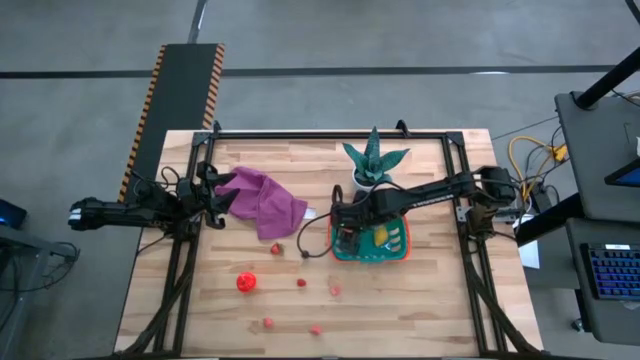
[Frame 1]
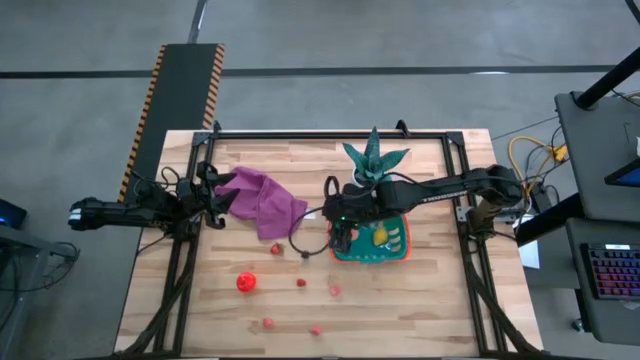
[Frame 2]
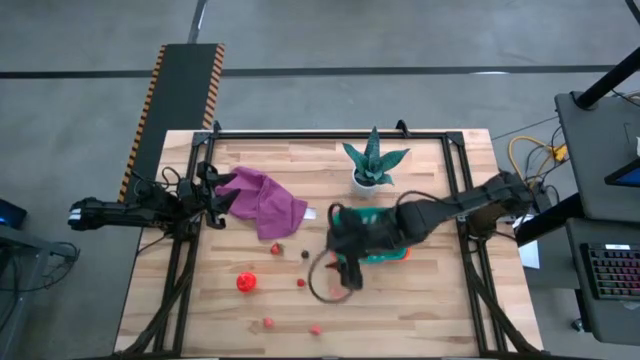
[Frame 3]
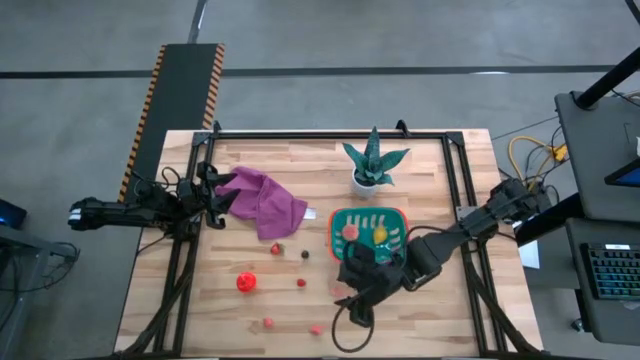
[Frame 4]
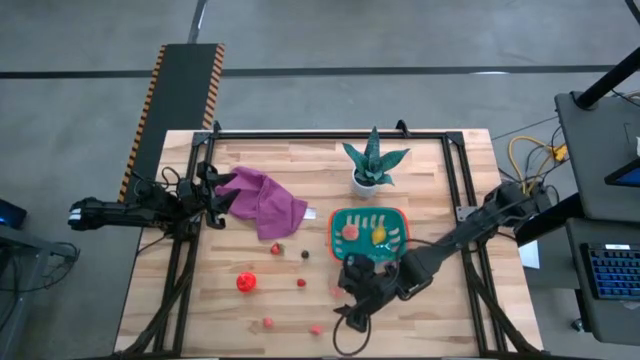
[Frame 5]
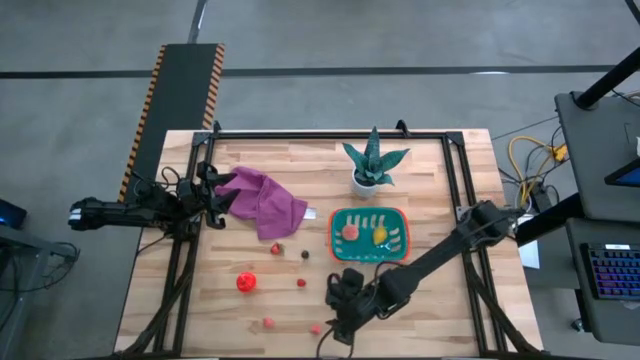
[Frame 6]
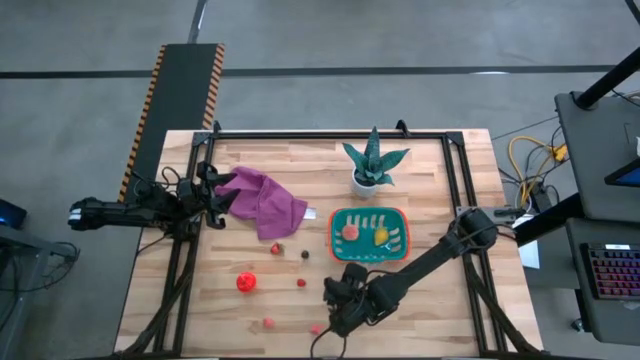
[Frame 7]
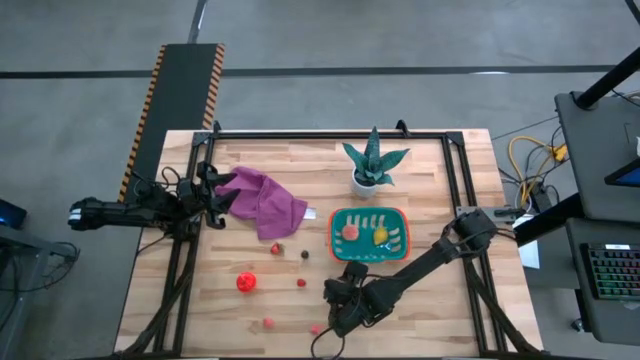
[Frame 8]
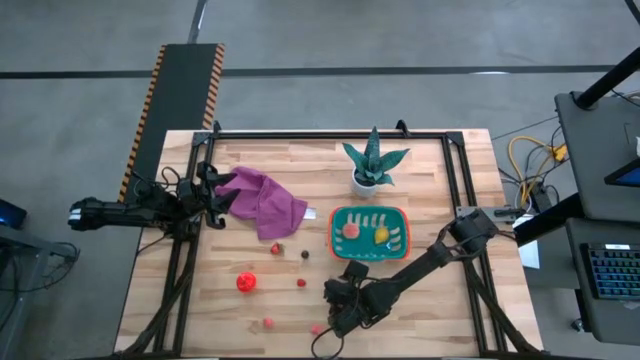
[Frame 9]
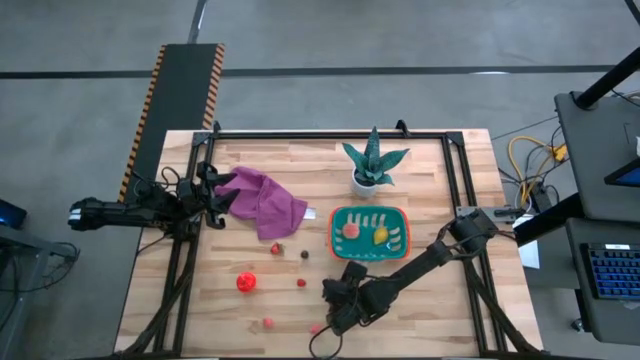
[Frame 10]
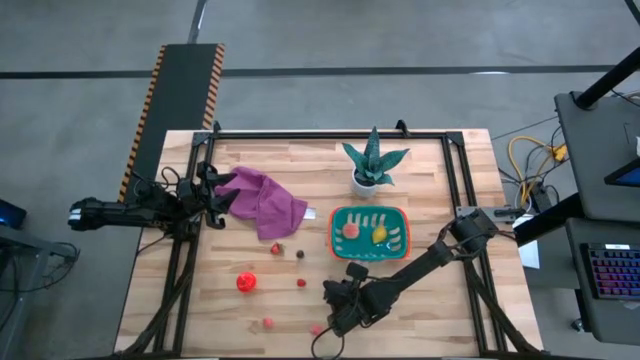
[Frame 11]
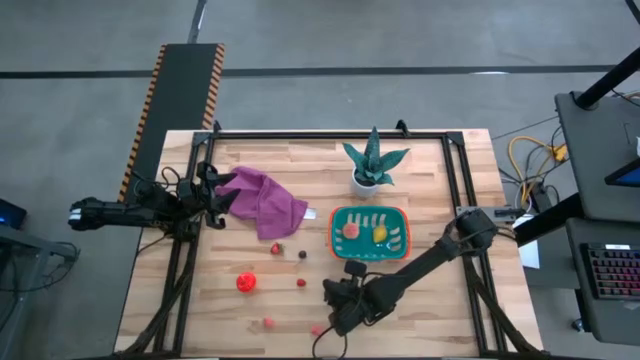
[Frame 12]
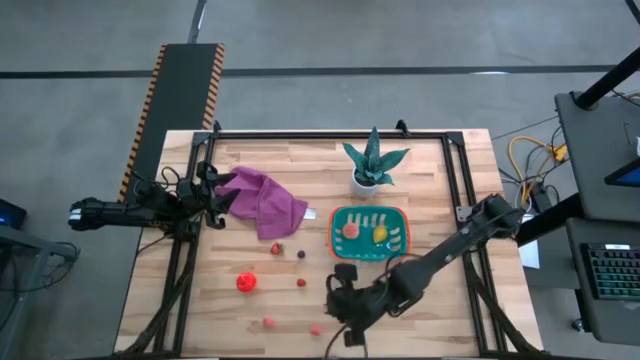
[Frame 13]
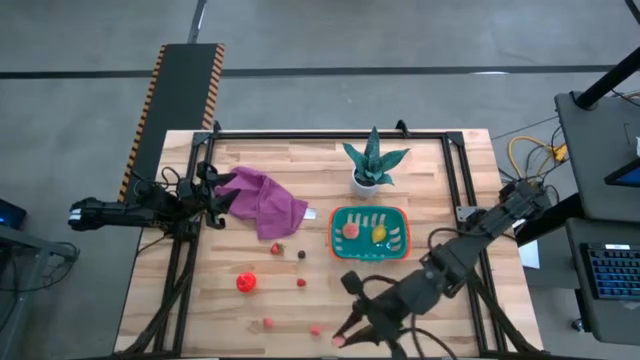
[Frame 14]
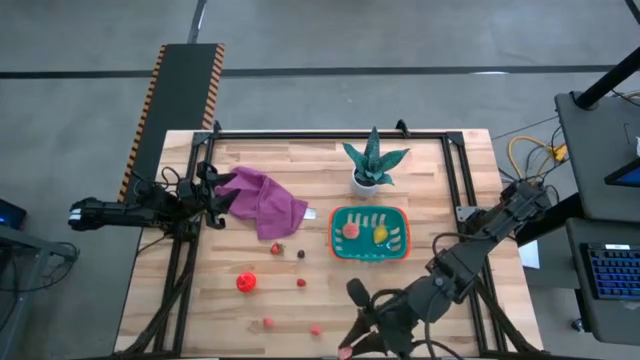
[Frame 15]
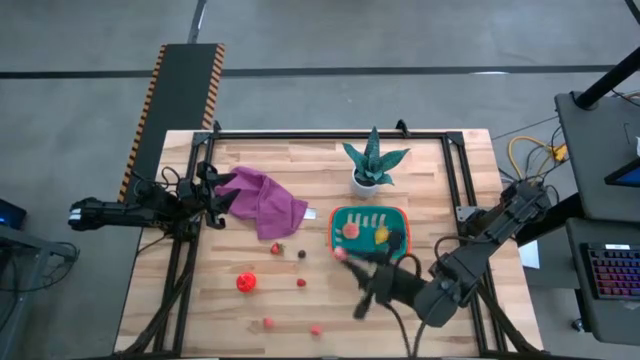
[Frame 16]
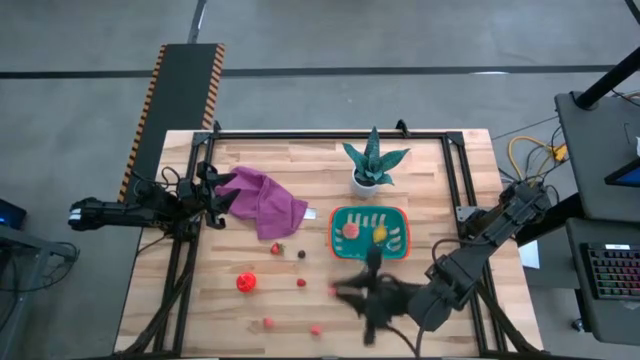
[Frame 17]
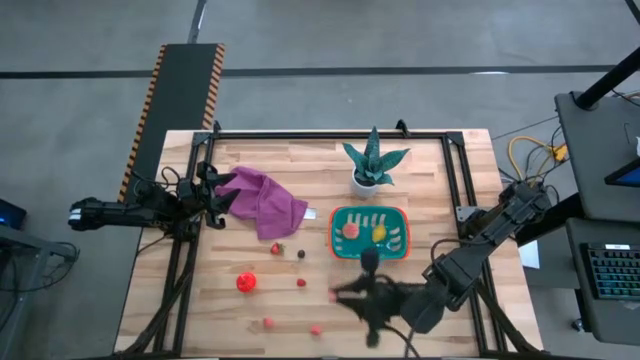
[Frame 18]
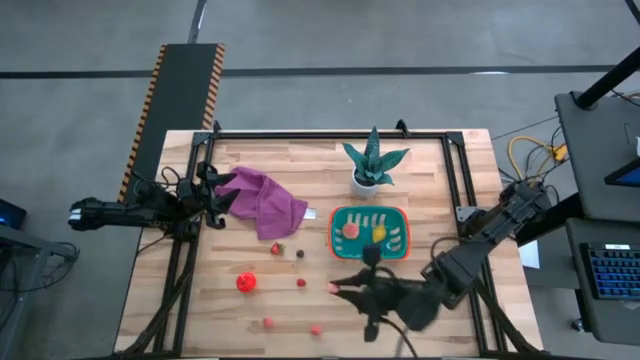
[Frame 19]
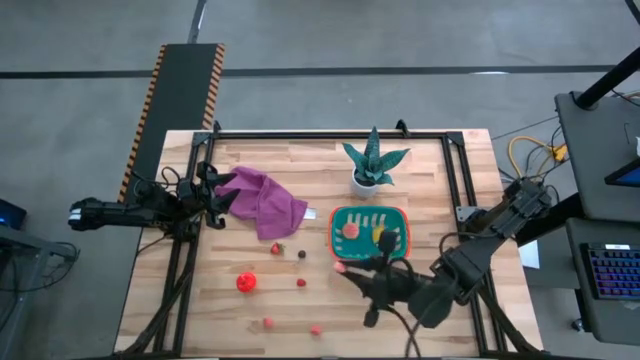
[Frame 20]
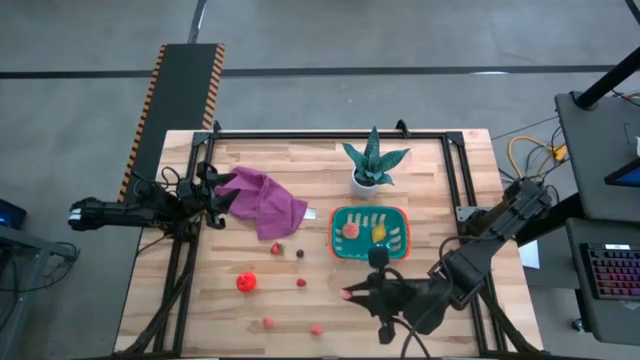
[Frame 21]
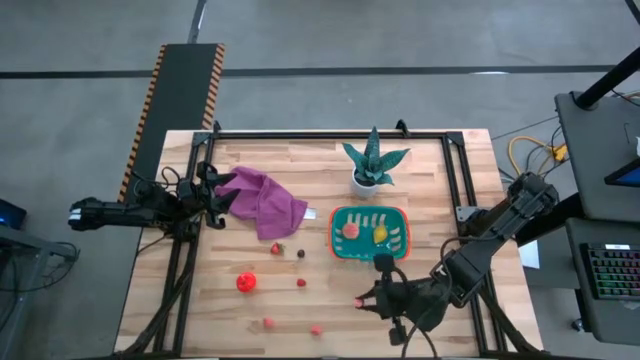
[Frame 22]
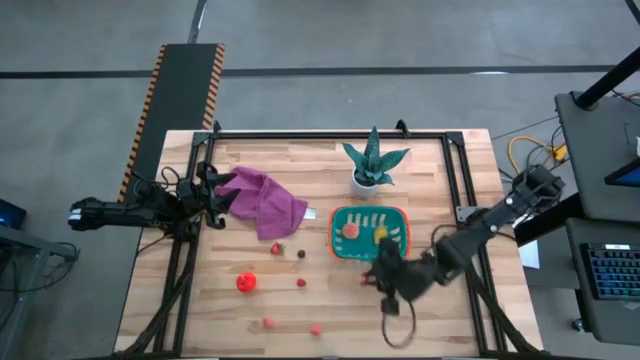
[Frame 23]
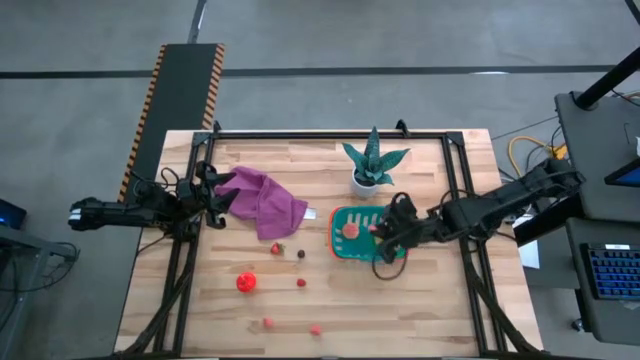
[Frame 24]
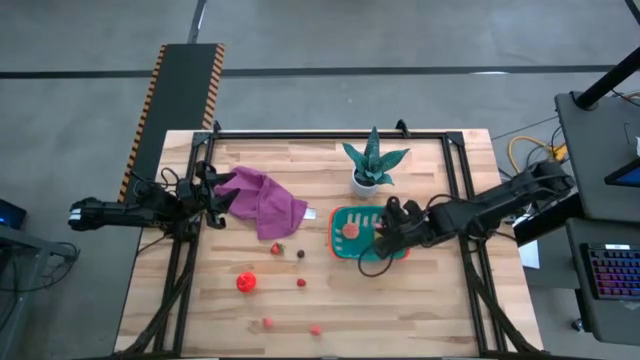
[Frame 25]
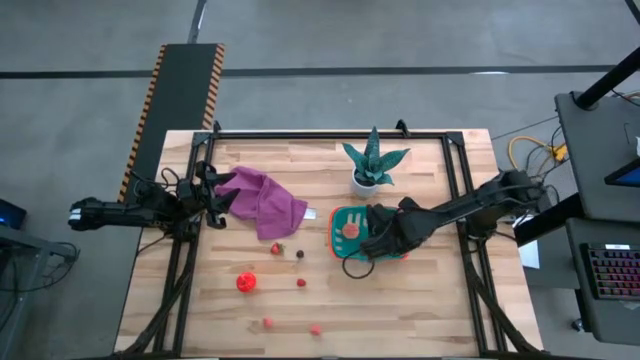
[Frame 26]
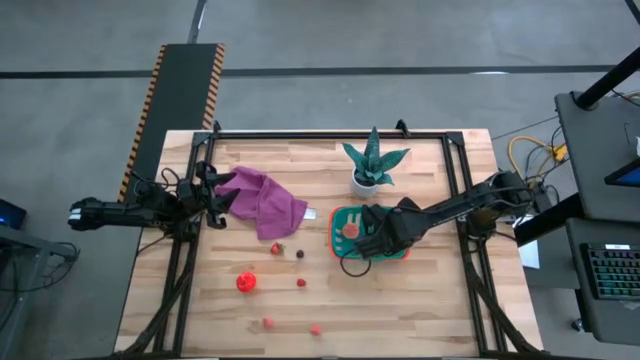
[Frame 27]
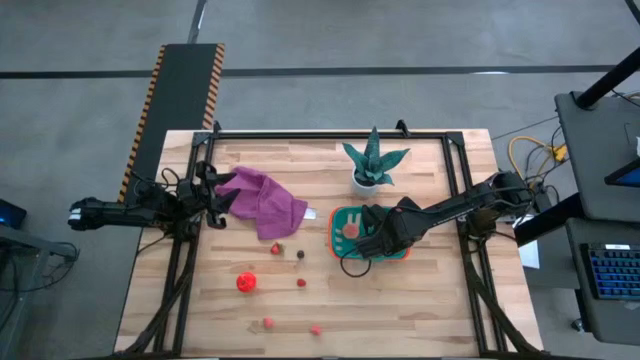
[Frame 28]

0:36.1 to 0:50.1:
Task: Pick and placing Produce into tupperware
Put the top apricot into the green basket

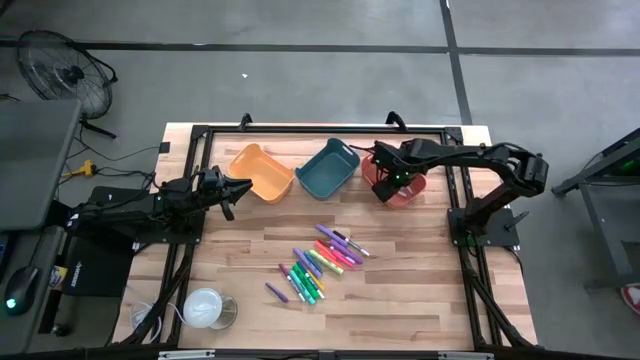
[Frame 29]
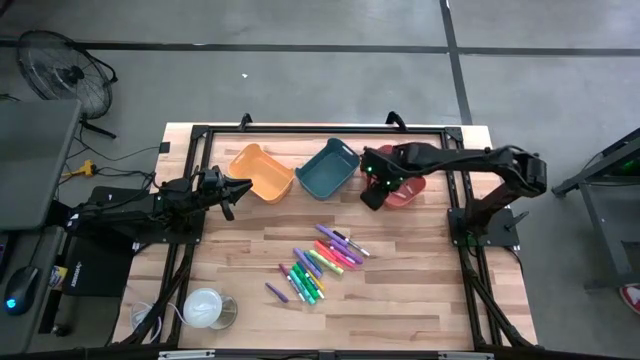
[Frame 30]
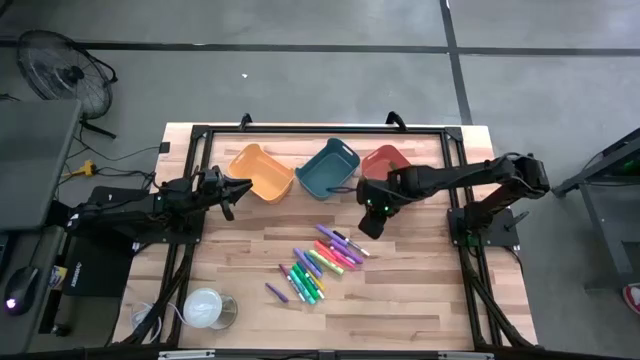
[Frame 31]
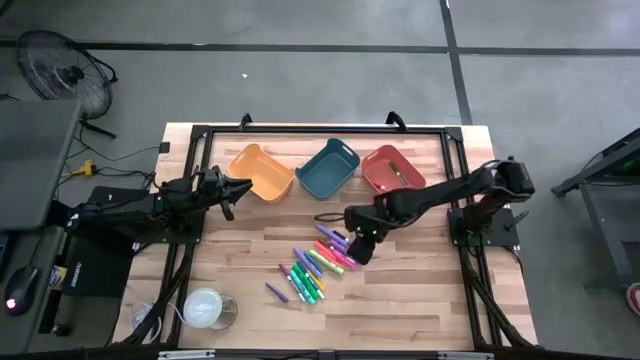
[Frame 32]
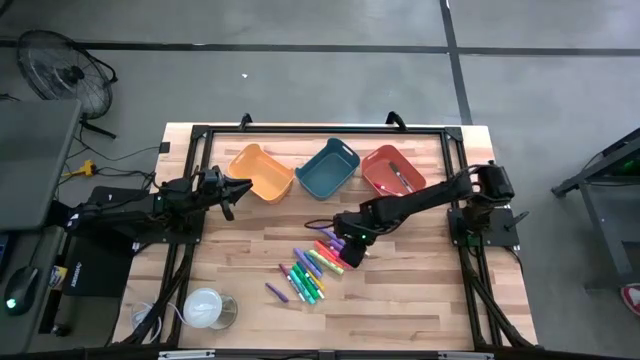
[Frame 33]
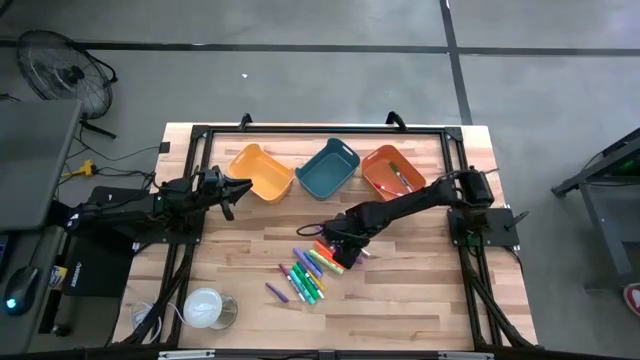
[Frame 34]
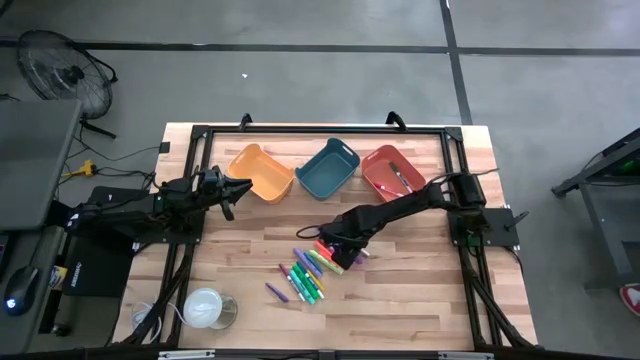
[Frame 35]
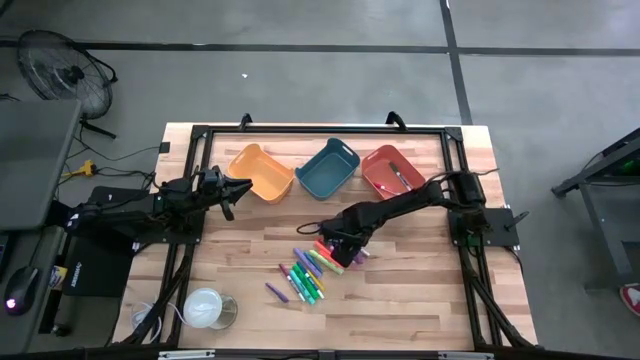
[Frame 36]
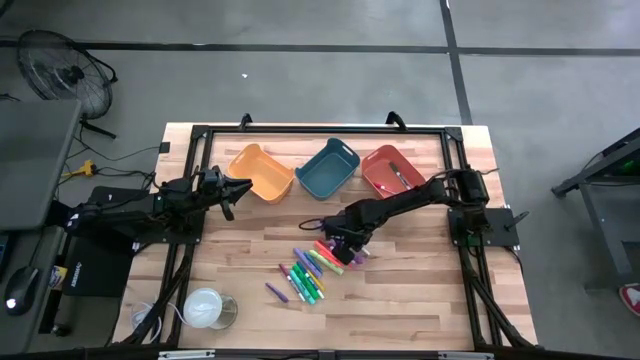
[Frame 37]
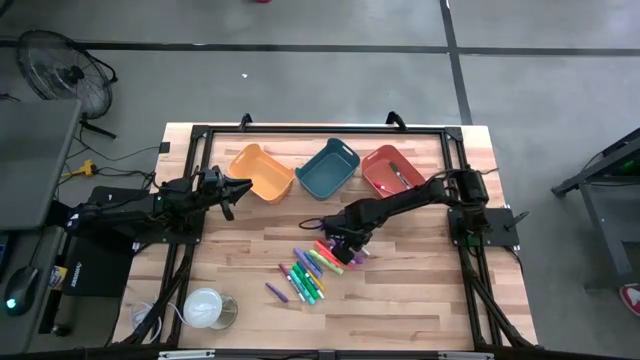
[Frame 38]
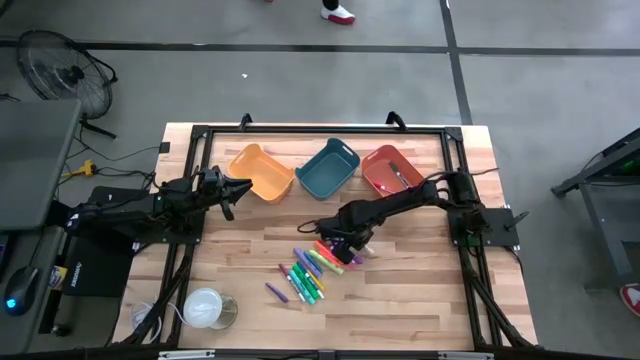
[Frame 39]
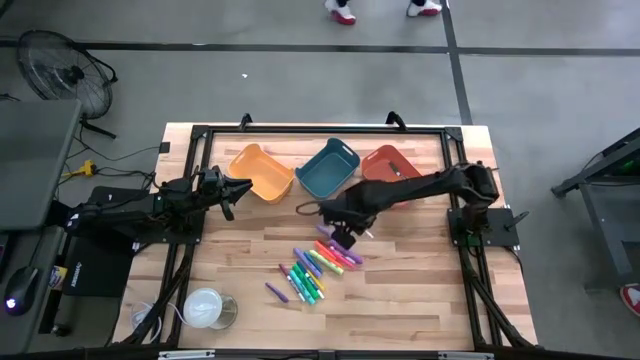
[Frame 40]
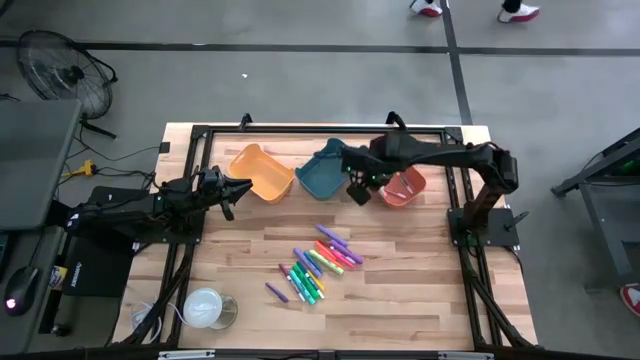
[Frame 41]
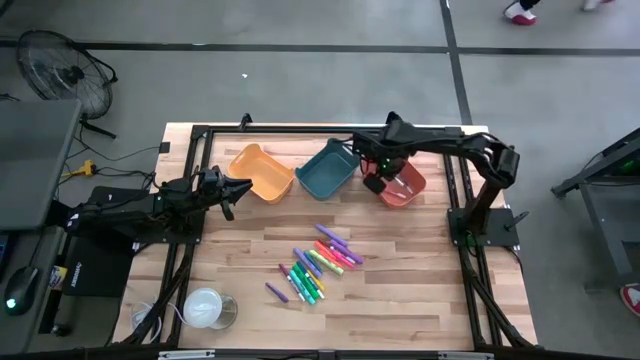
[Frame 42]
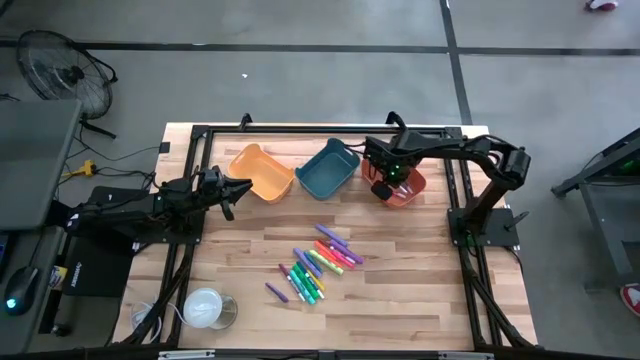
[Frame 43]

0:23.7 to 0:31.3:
Task: Pick & Place Markers
Put the black marker pen into the orange bin
